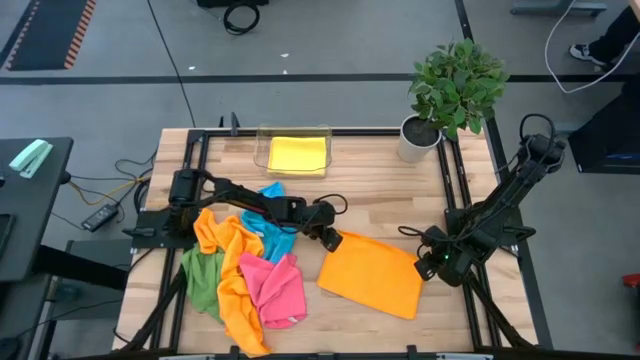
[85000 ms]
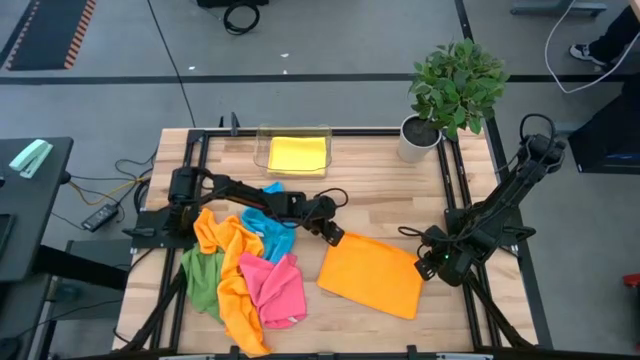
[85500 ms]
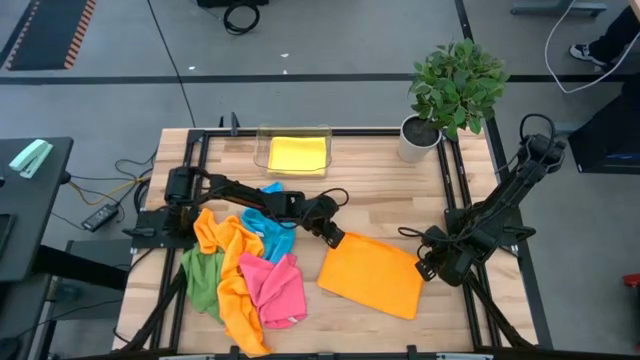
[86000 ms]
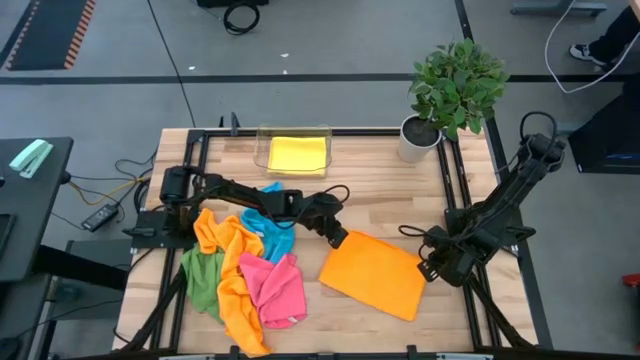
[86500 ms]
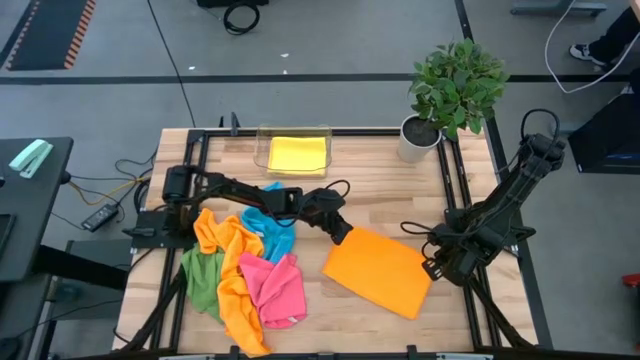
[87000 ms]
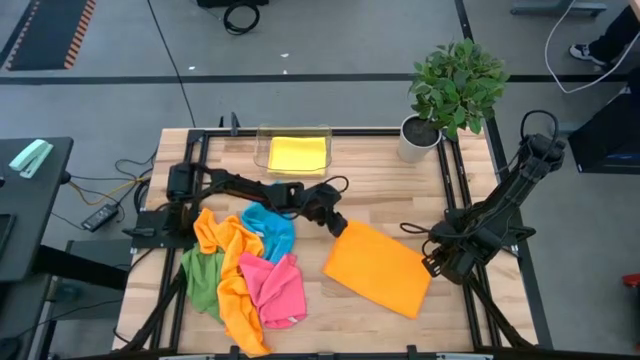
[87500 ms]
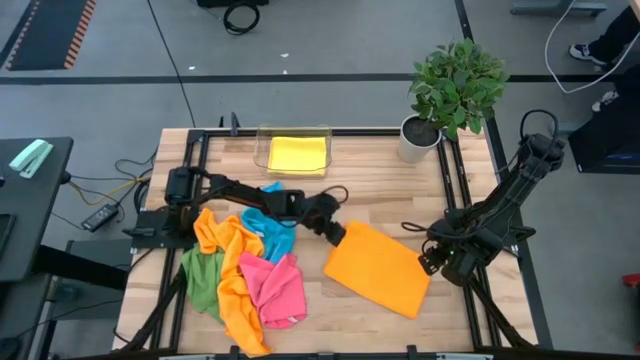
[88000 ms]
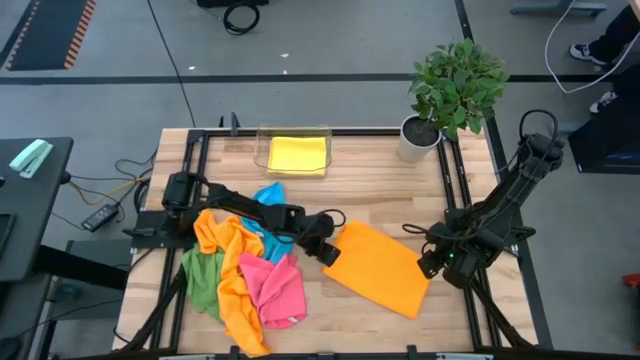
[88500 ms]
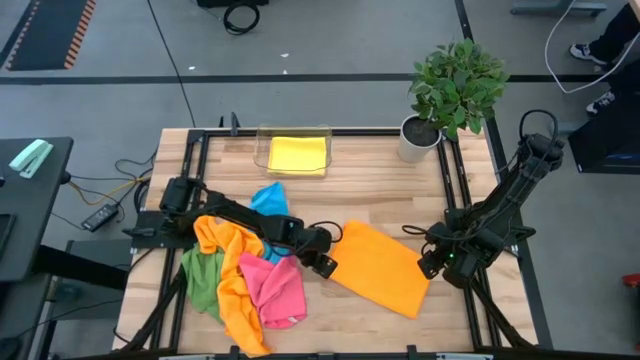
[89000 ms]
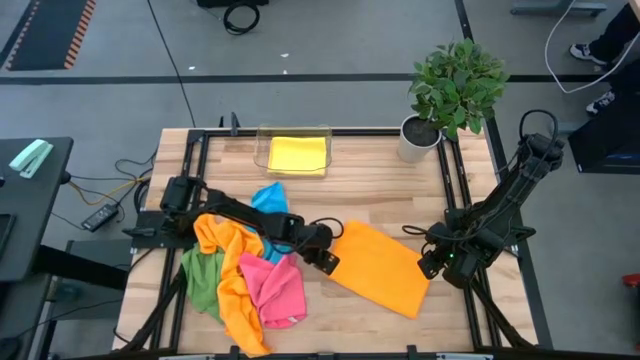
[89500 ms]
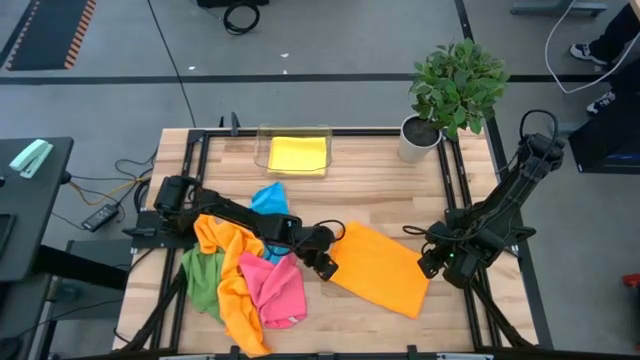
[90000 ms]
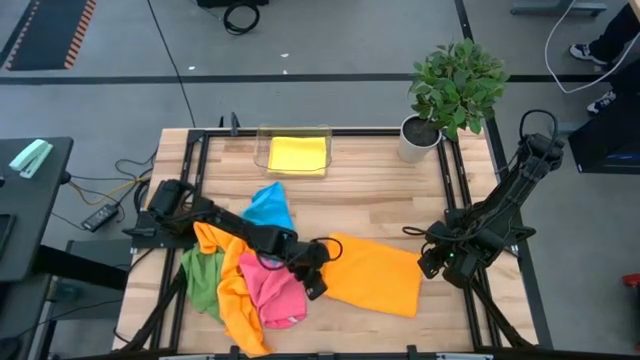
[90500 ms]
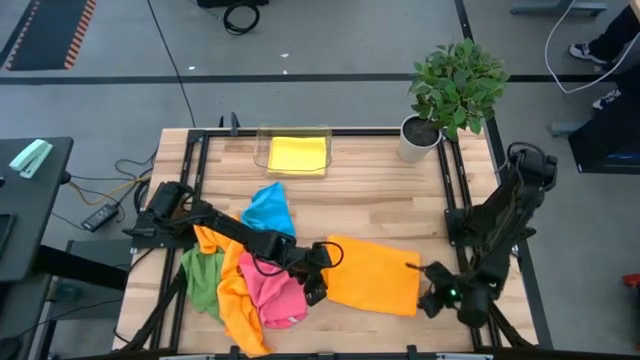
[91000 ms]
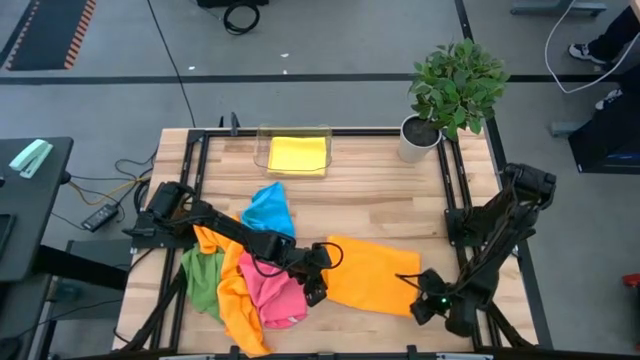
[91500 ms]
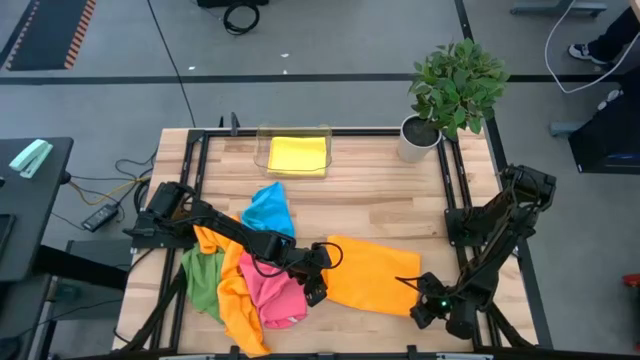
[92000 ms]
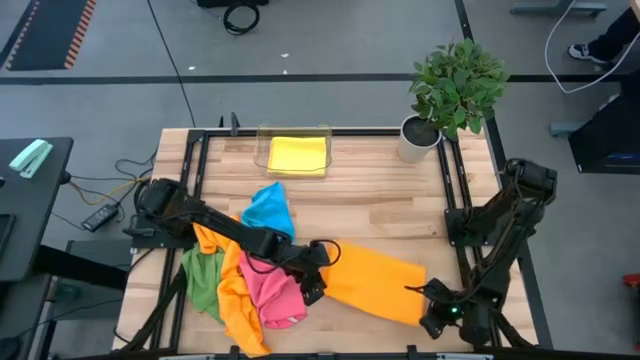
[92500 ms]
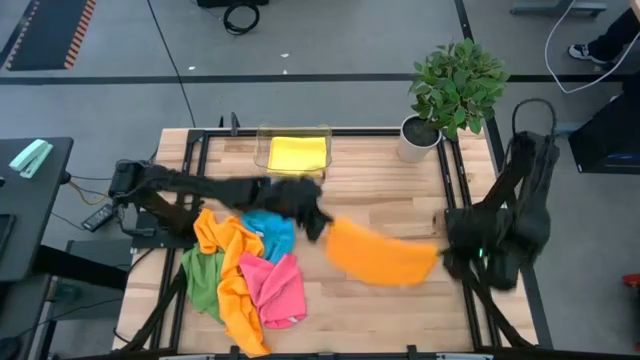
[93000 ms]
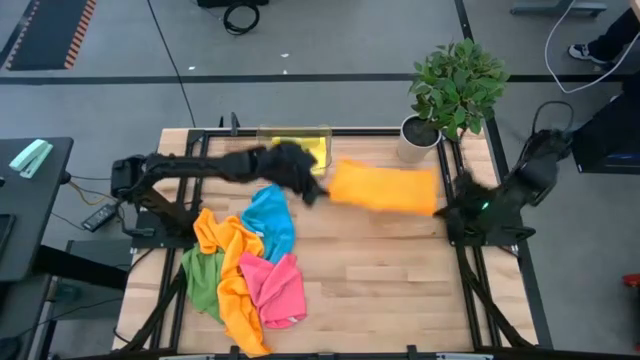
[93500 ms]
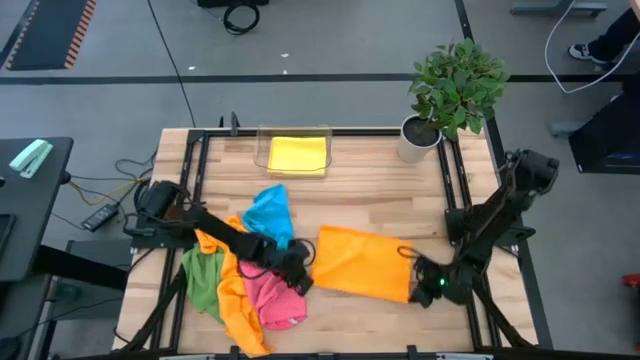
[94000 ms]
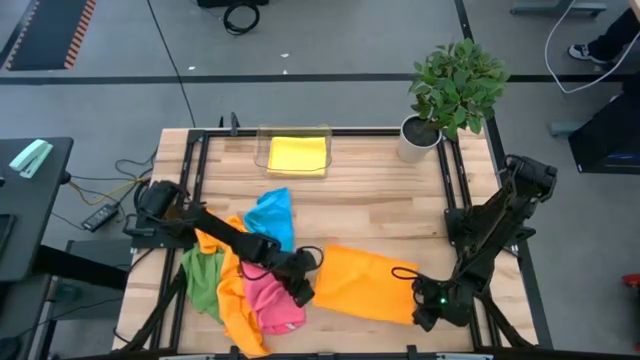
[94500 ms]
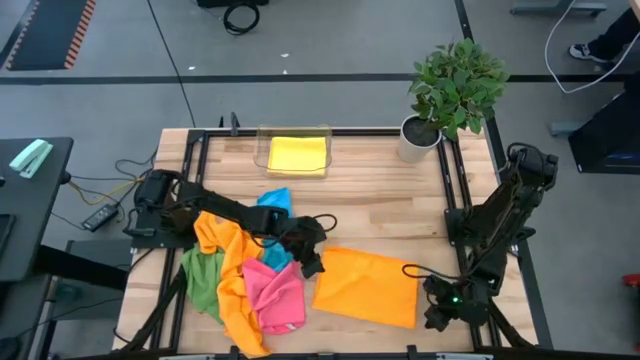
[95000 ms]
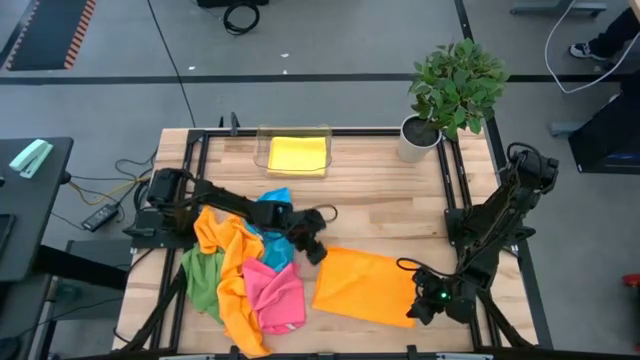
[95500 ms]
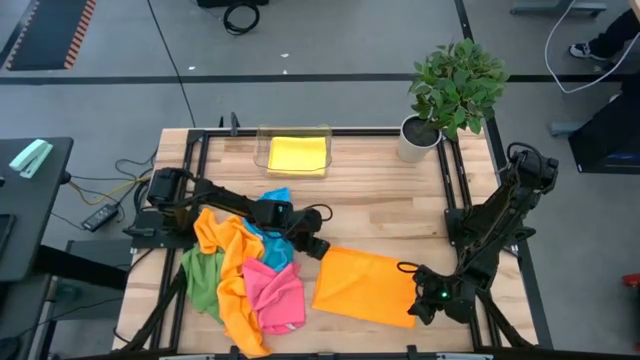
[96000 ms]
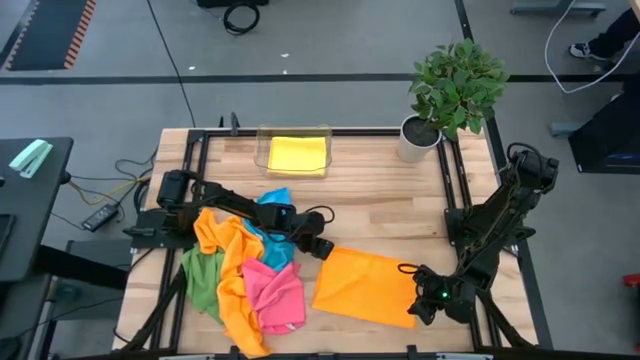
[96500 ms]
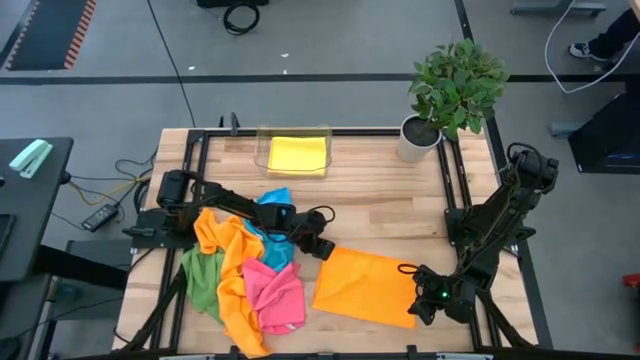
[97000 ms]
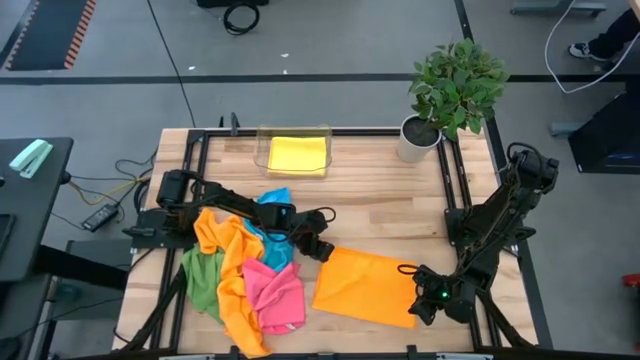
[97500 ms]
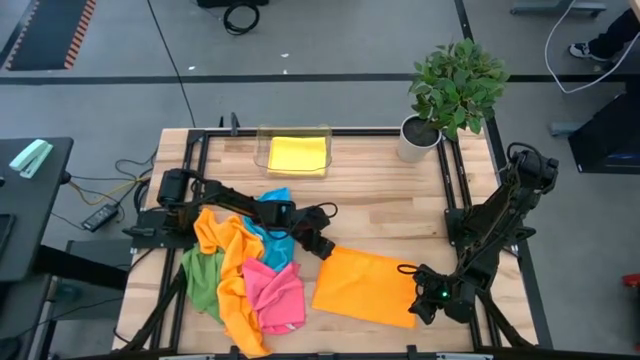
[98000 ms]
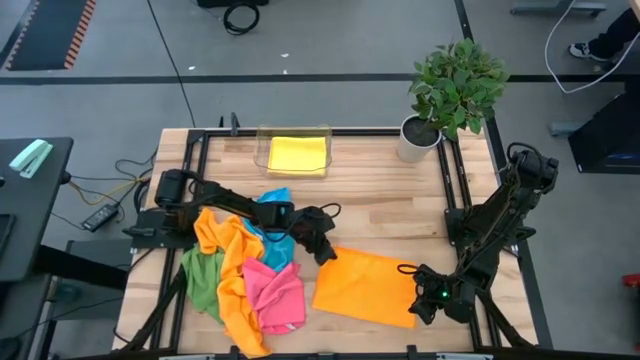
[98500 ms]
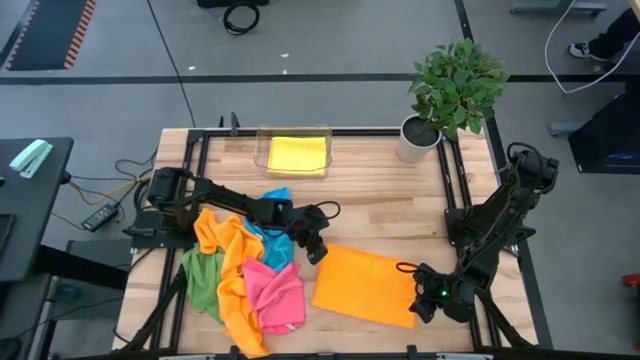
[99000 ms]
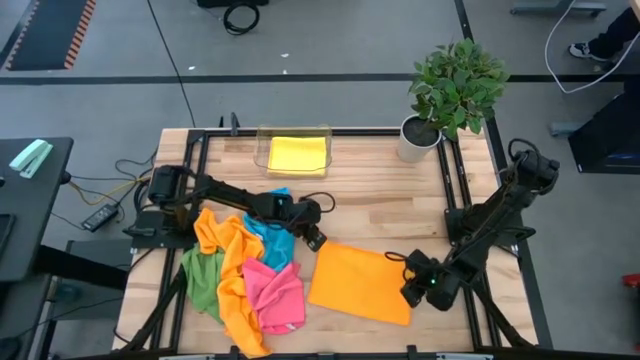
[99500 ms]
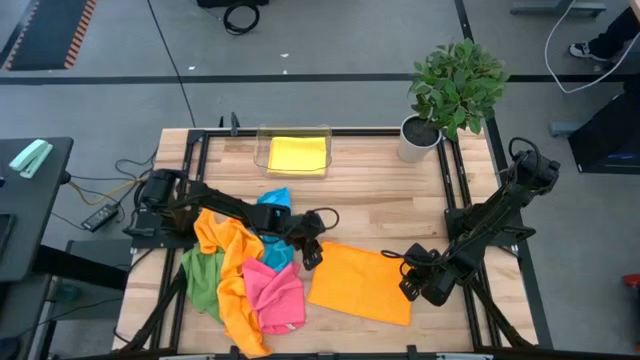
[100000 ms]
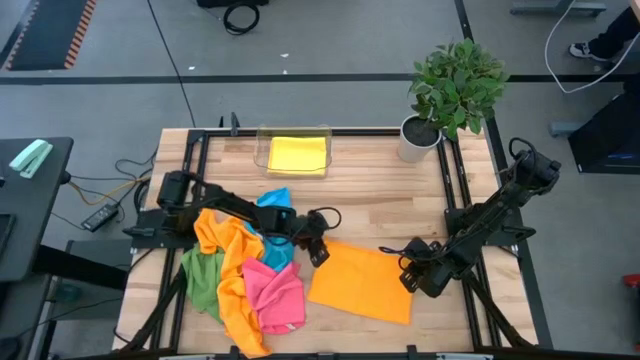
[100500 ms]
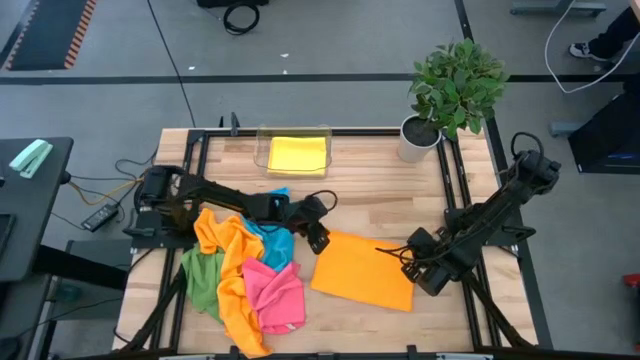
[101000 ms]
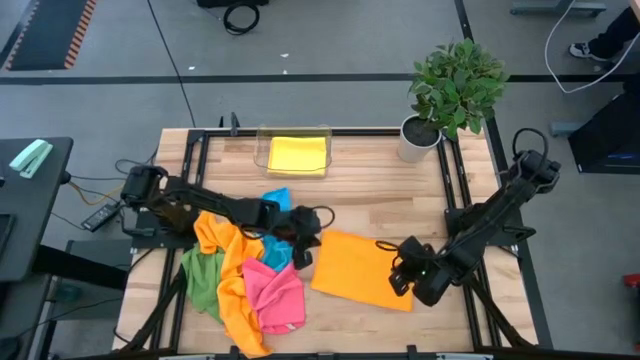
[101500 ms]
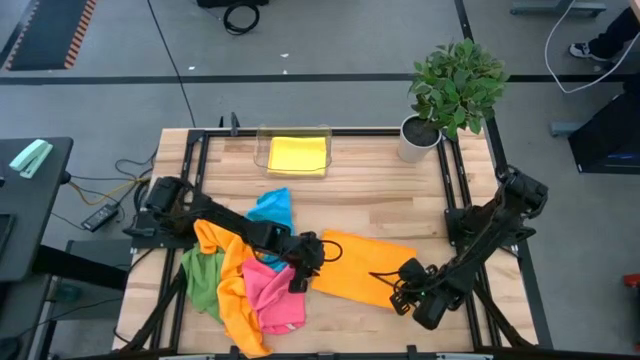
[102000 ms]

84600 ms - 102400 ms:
Task: Fold microfiber towels
Fold the orange microfiber towel

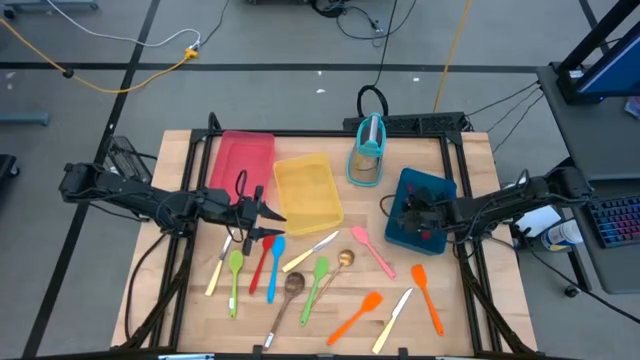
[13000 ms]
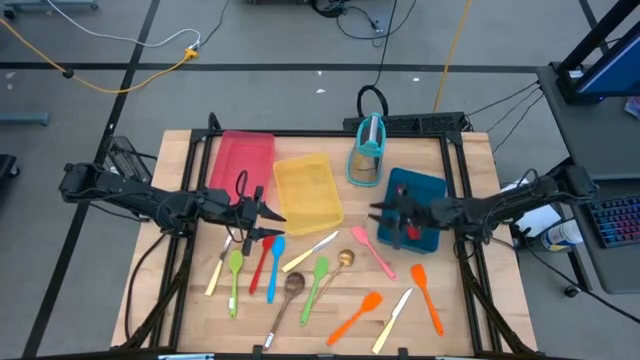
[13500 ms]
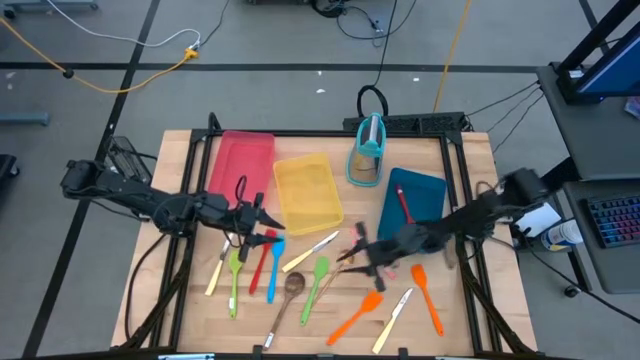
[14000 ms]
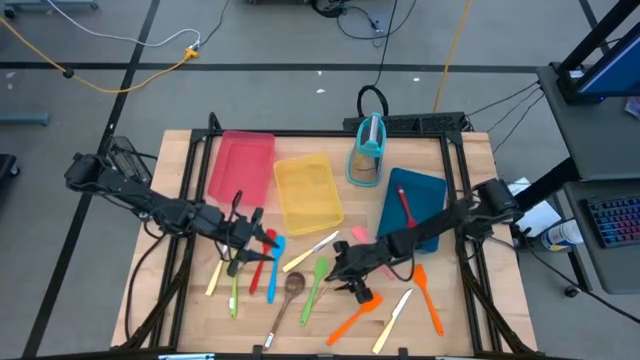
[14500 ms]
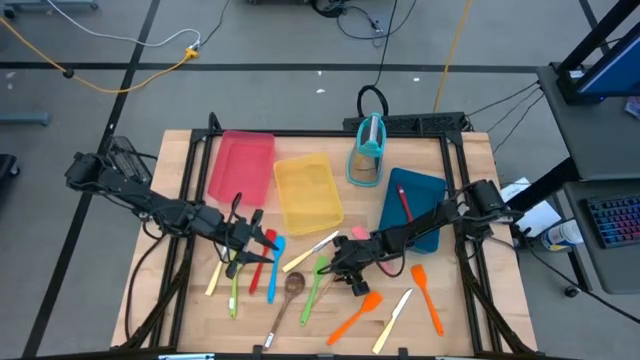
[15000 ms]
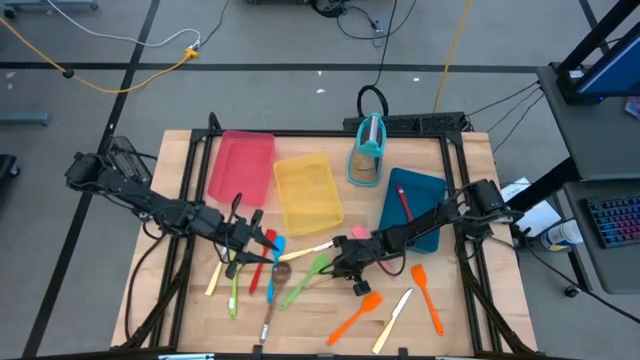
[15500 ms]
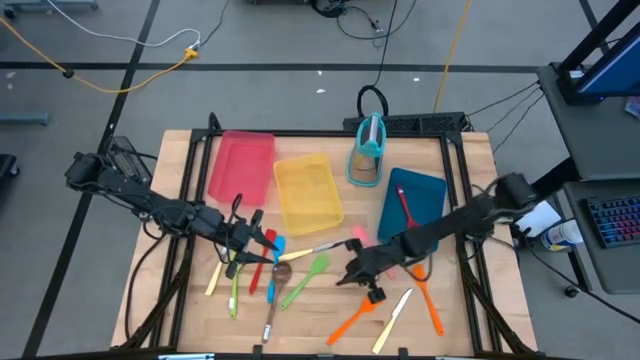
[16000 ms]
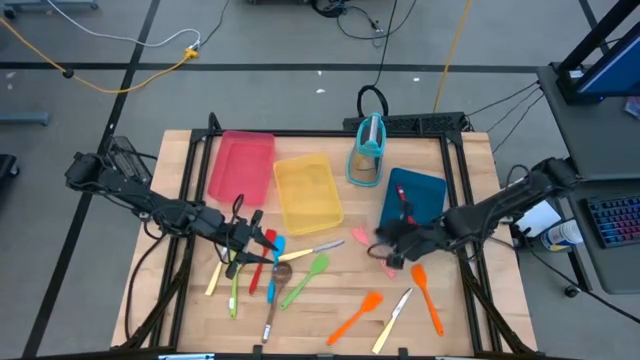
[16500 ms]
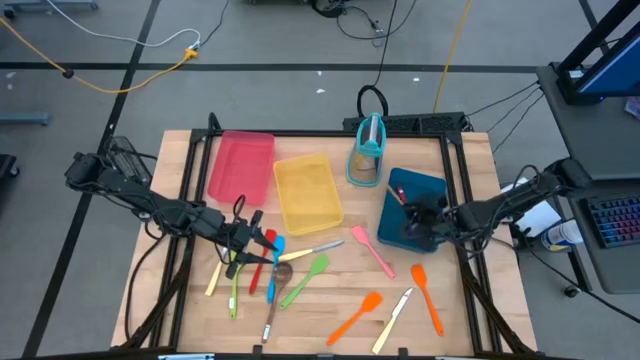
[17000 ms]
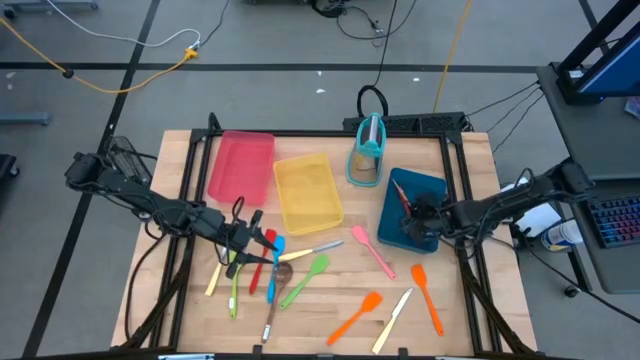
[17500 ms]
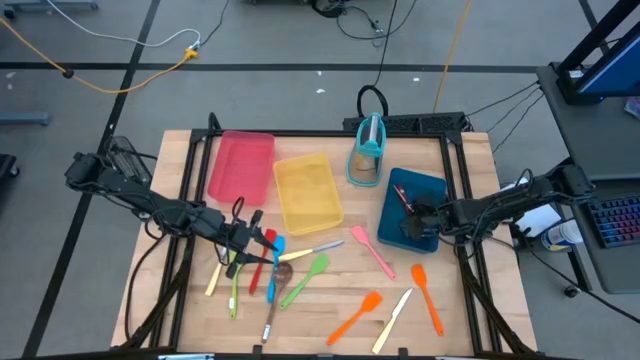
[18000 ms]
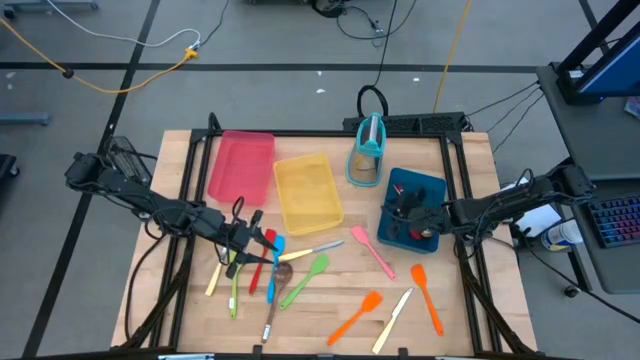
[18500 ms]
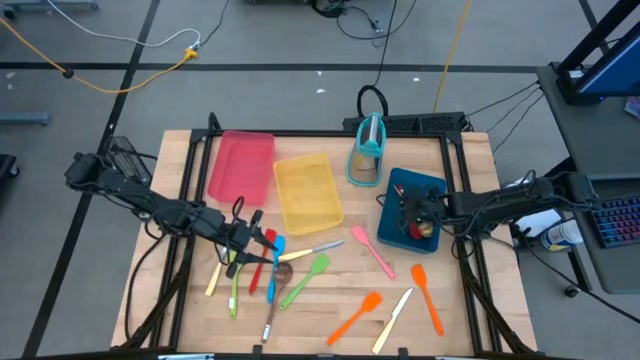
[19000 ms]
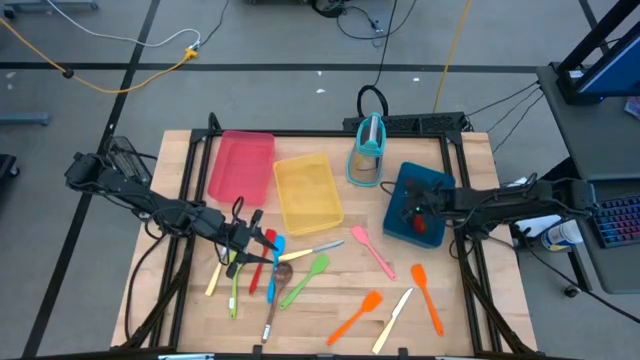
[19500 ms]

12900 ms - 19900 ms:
Task: Pick & Place Kitchen Items
Put the gold serving spoon into the blue bin
